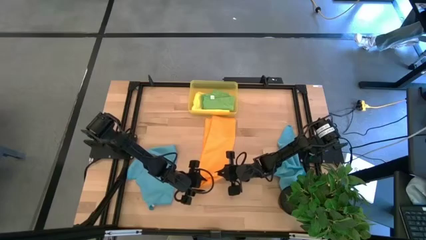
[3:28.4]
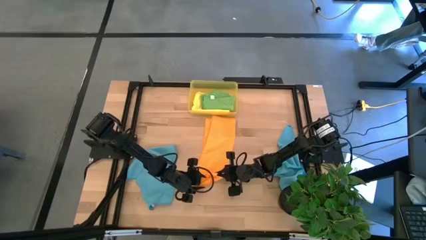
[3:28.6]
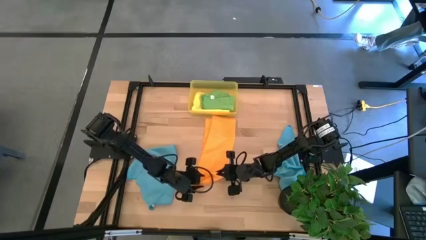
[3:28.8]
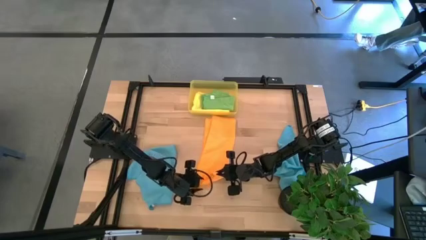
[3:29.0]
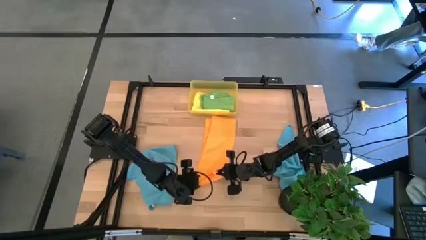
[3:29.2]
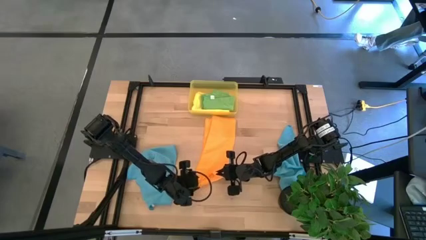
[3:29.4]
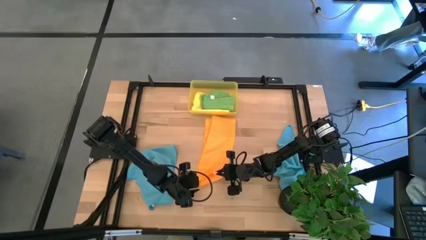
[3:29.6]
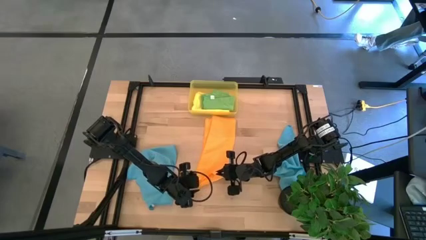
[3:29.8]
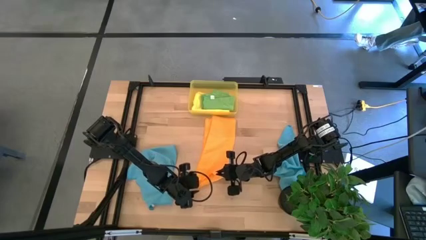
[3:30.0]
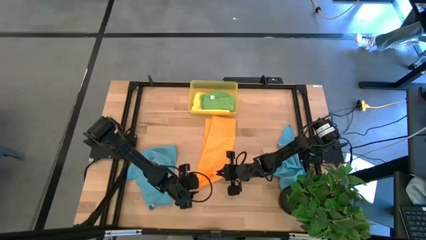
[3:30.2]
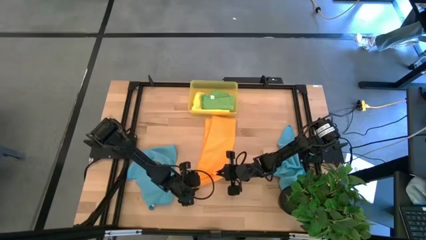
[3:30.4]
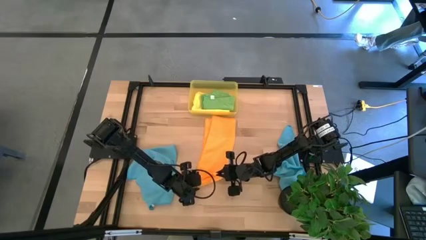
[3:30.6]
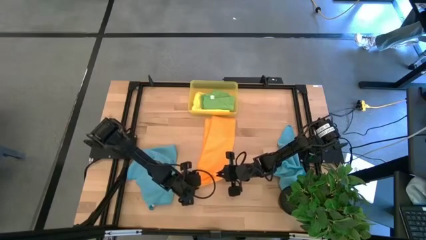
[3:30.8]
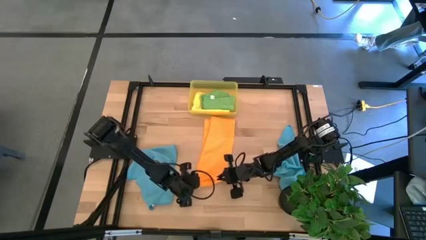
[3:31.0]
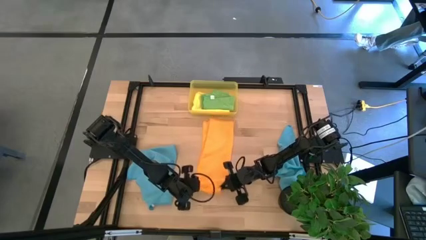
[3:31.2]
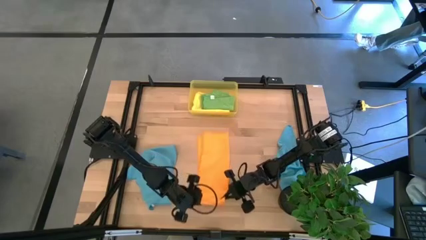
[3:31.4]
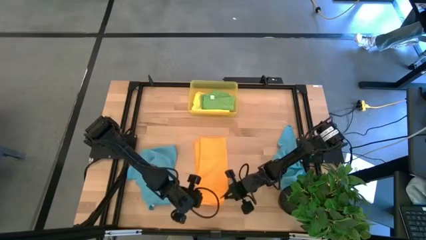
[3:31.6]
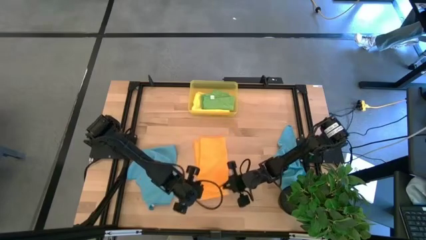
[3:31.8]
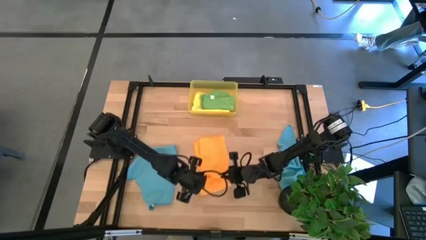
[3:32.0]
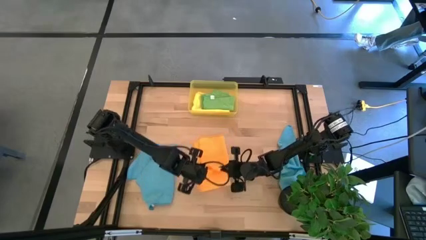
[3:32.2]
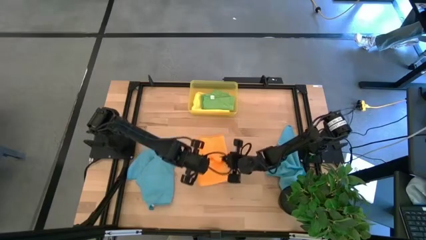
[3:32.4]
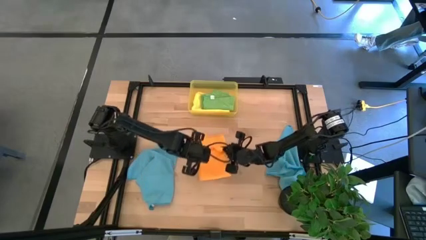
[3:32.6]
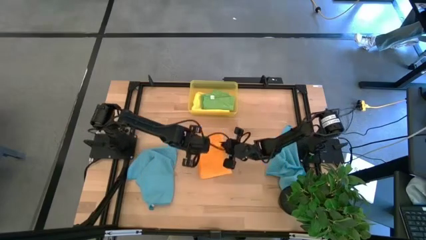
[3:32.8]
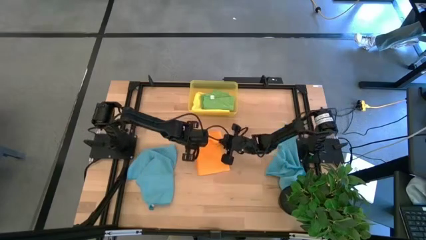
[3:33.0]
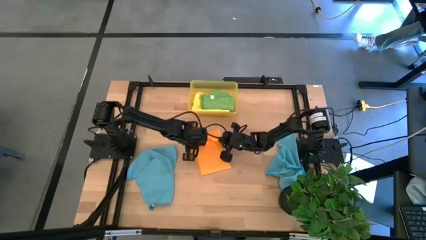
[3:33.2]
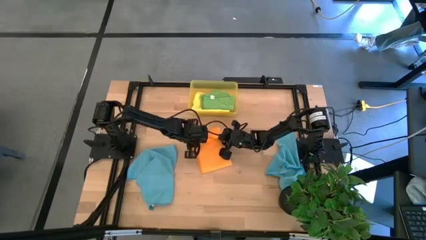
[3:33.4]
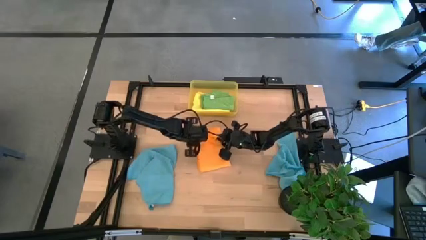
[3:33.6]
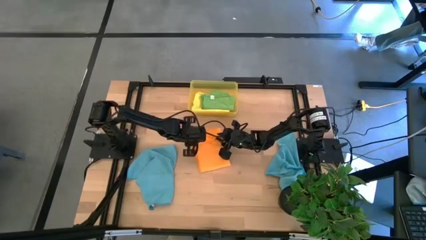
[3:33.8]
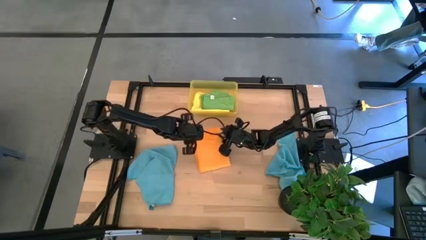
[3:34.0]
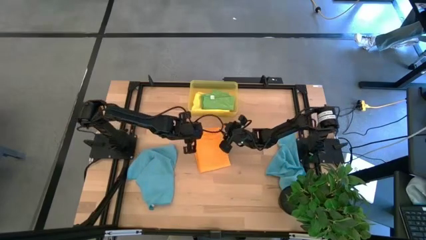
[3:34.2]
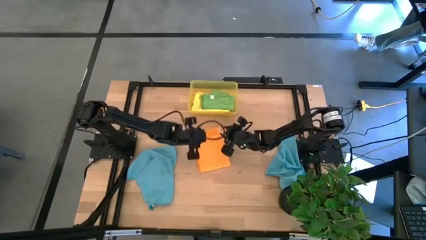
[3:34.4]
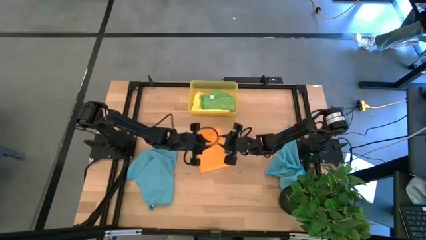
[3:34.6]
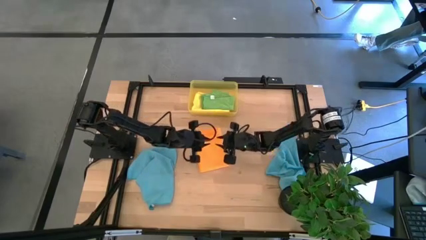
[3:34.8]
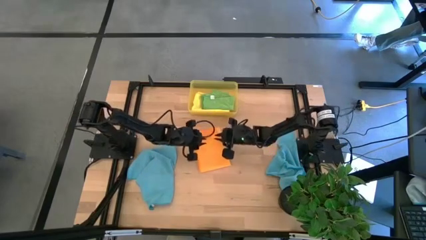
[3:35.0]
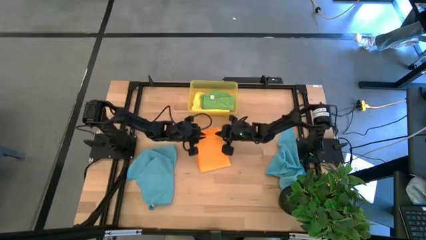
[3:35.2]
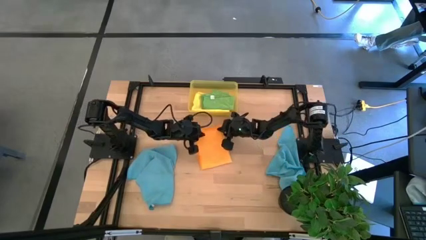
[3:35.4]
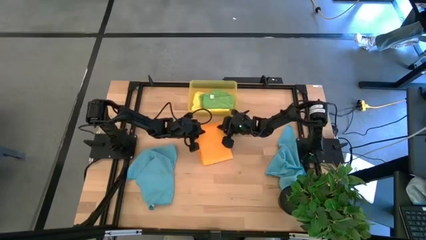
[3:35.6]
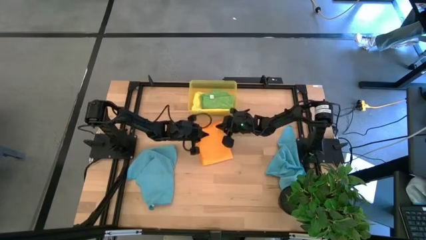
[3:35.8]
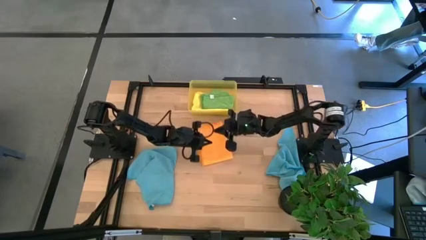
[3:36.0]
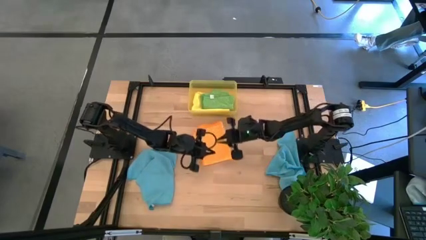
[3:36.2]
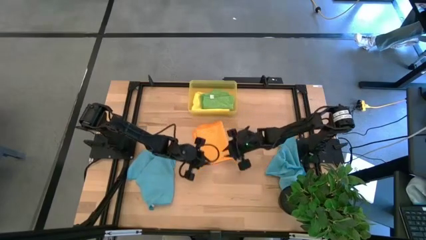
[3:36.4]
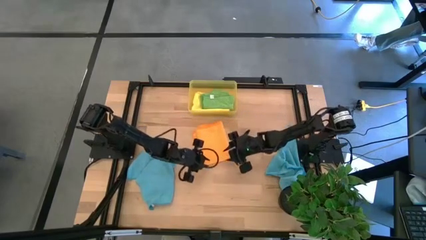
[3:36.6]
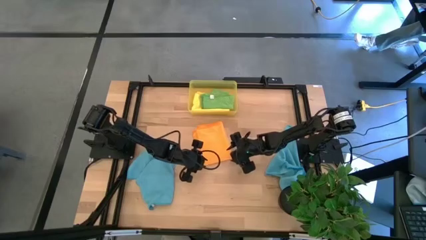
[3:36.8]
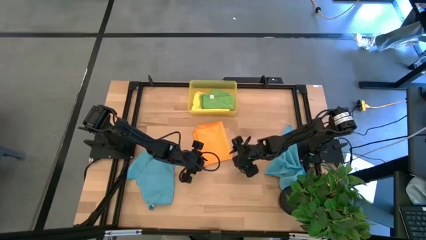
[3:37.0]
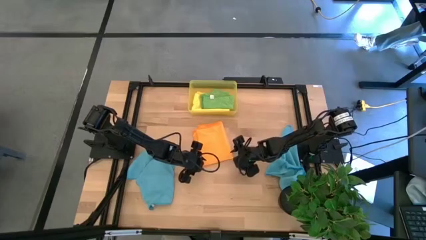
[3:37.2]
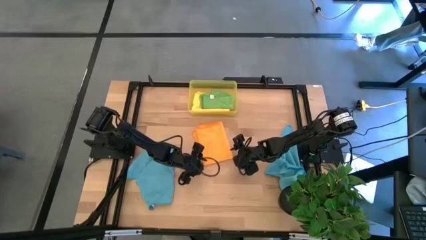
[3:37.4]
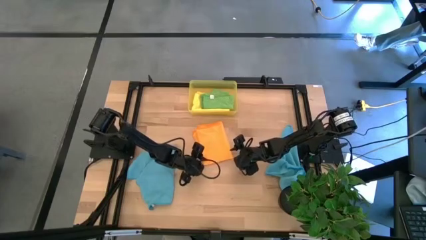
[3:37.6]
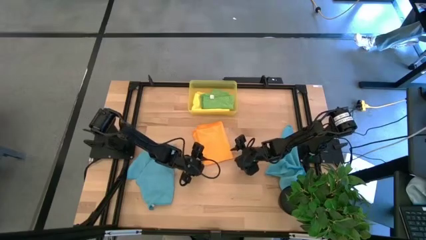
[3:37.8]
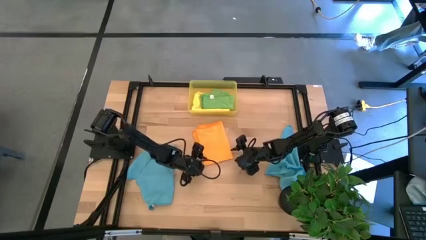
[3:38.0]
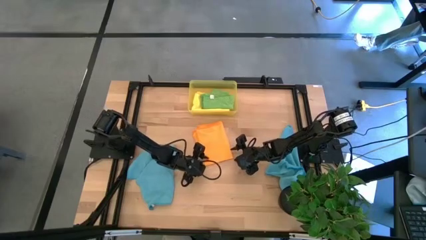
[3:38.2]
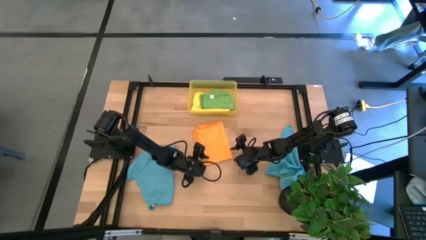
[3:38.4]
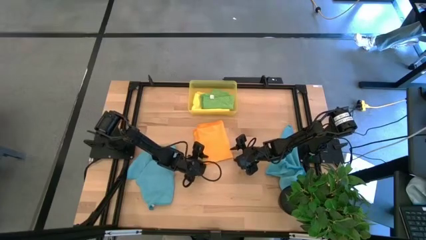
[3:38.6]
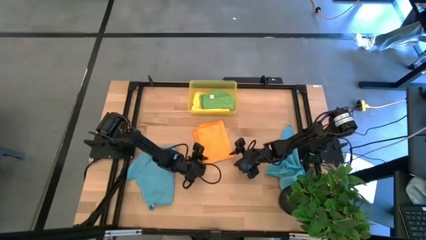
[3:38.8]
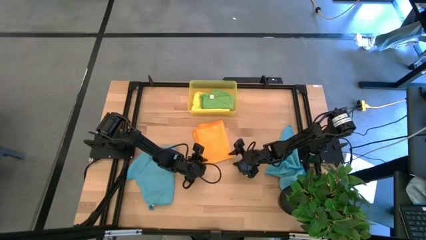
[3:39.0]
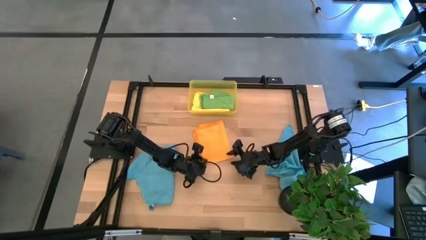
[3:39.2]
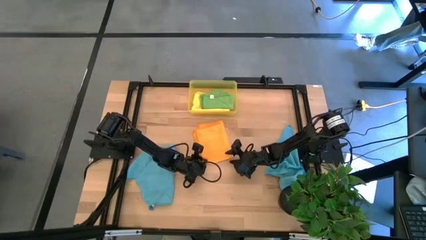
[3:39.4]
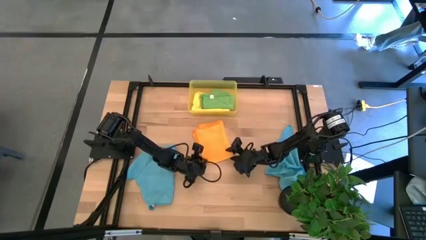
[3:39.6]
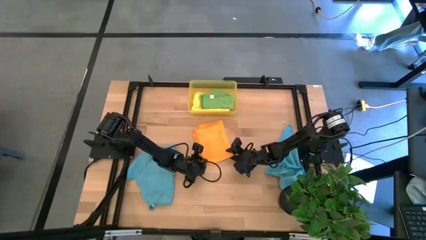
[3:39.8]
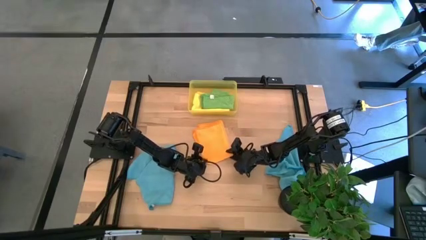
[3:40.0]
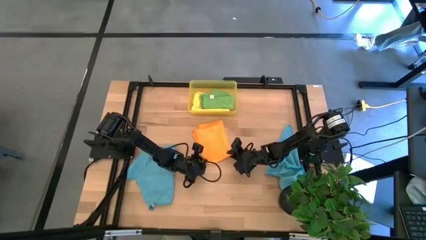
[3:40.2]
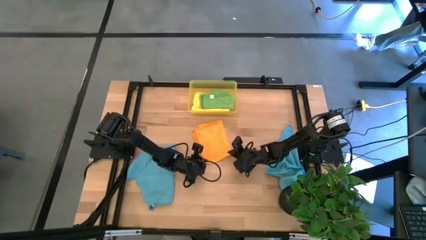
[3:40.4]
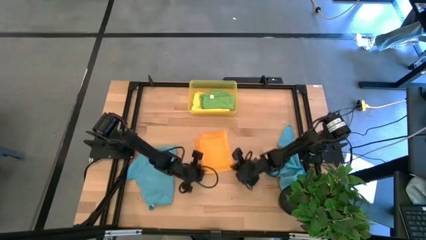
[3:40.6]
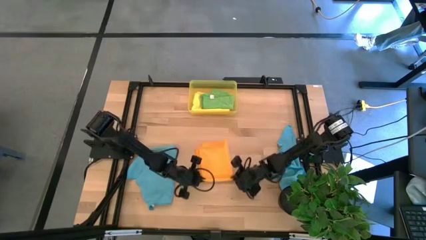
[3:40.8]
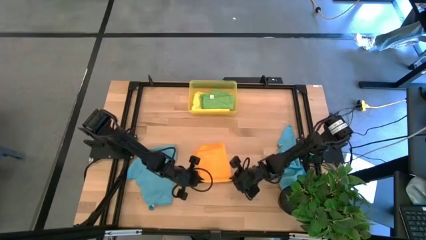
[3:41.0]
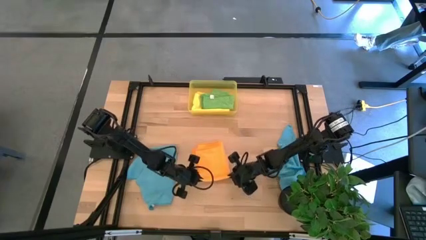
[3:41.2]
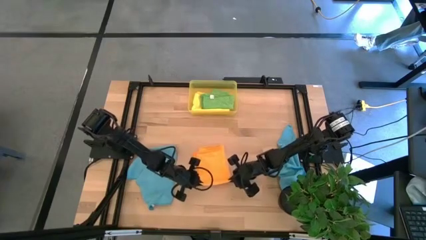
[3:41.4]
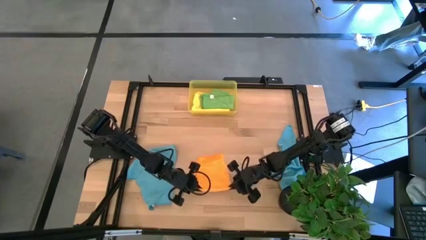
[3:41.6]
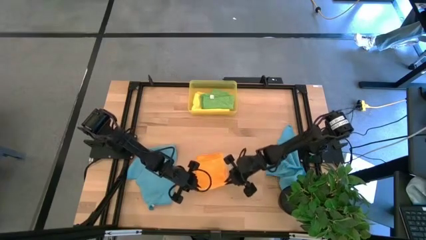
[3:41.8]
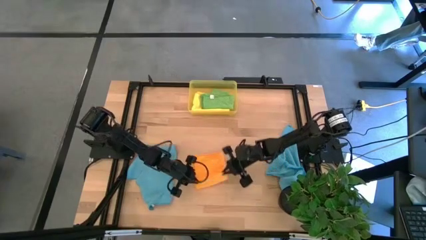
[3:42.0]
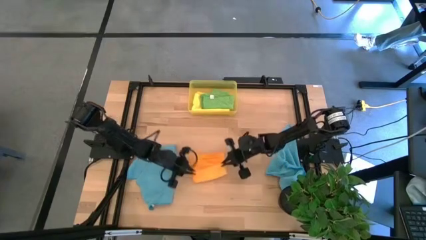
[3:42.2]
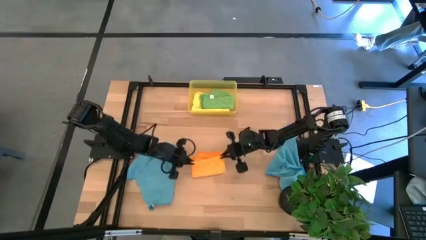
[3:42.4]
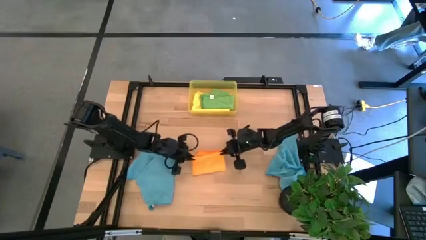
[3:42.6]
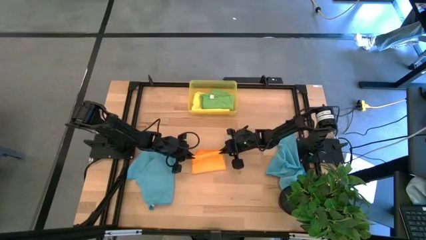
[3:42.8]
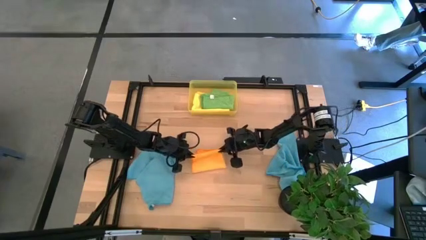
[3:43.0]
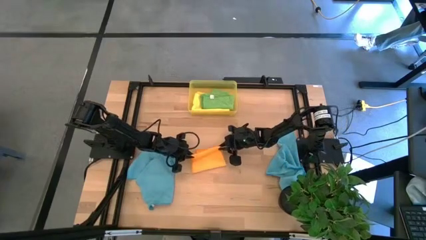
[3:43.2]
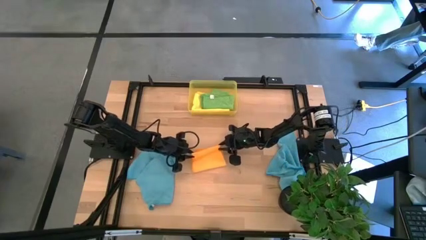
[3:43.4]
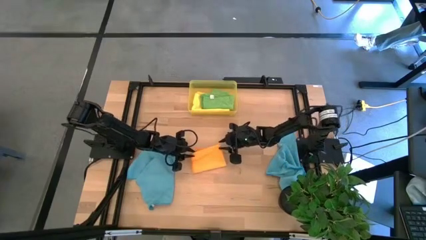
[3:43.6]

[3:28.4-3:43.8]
Task: Fold microfiber towels
Fold the orange towel
